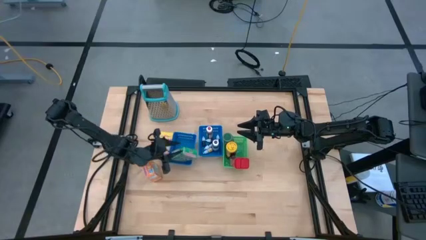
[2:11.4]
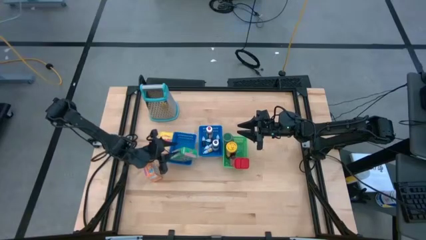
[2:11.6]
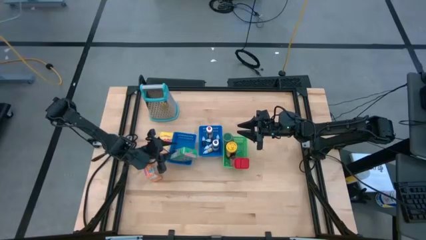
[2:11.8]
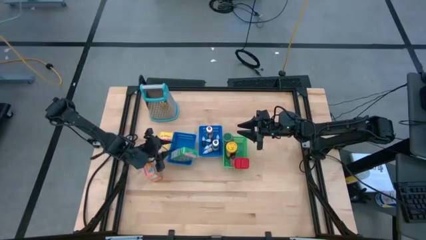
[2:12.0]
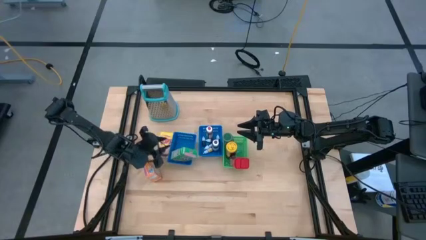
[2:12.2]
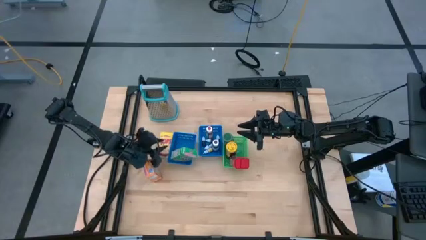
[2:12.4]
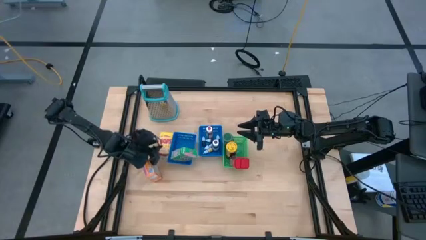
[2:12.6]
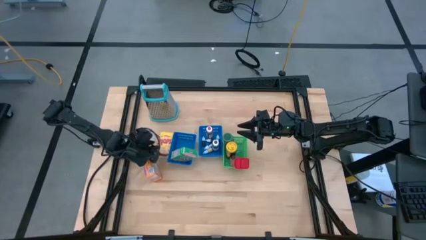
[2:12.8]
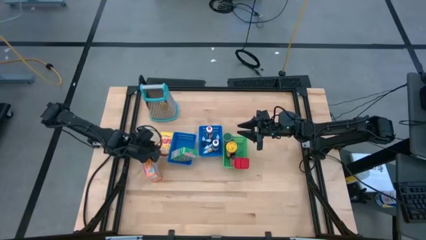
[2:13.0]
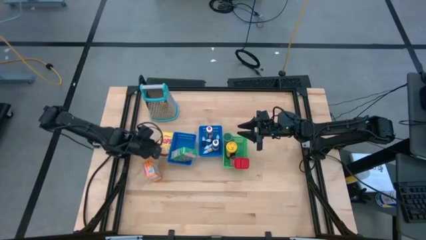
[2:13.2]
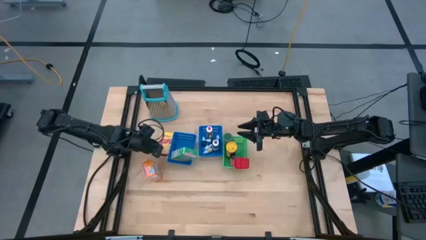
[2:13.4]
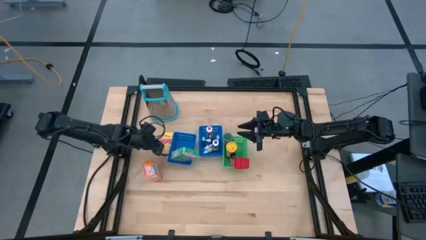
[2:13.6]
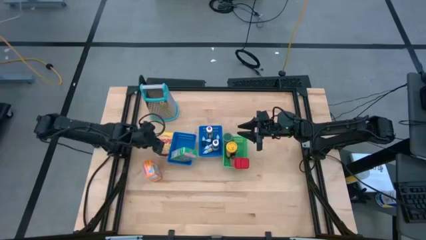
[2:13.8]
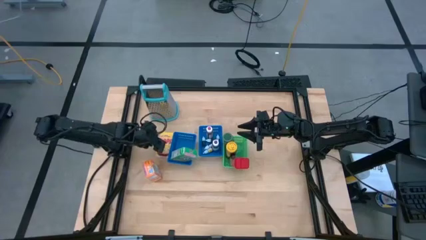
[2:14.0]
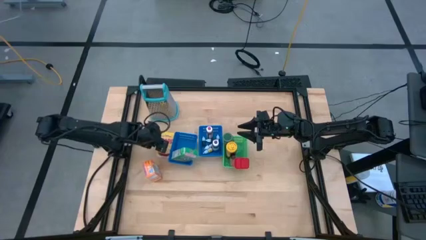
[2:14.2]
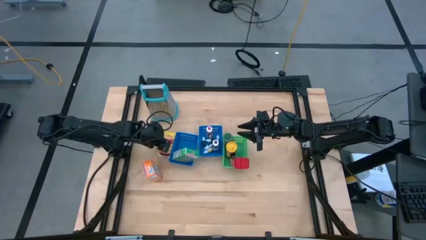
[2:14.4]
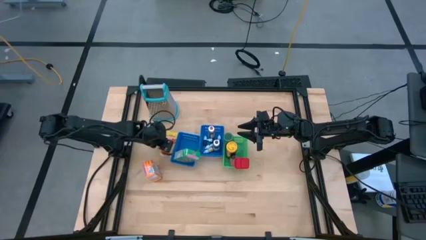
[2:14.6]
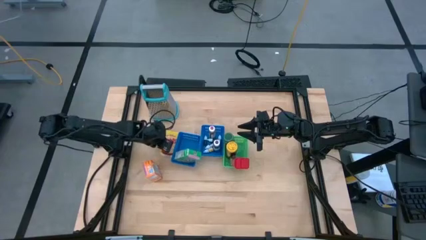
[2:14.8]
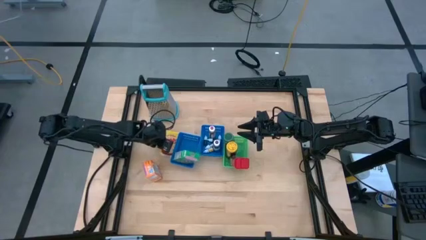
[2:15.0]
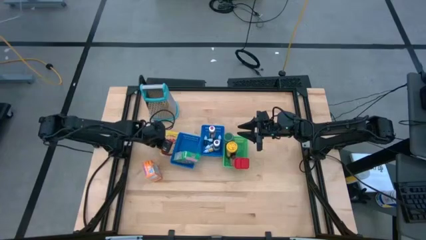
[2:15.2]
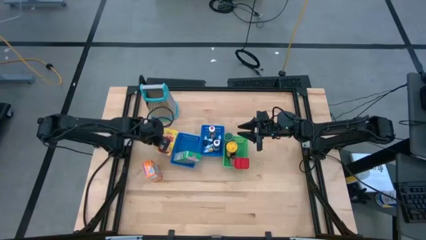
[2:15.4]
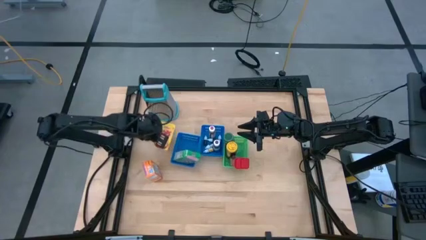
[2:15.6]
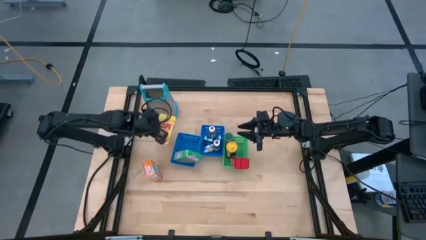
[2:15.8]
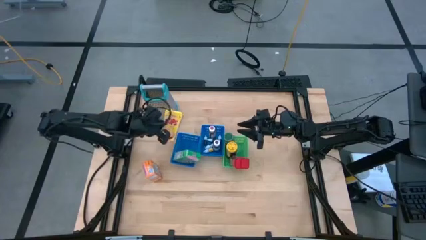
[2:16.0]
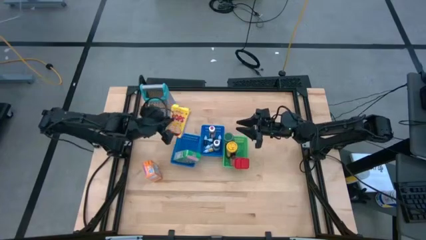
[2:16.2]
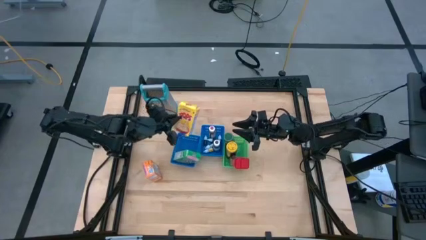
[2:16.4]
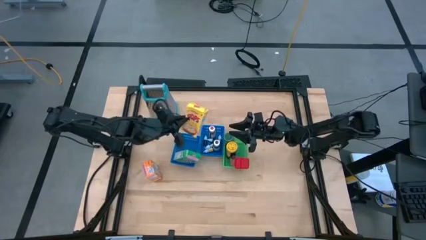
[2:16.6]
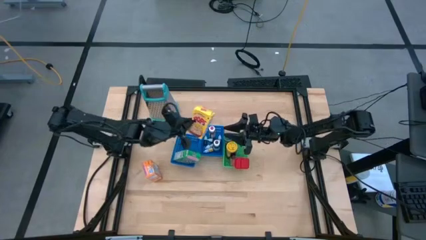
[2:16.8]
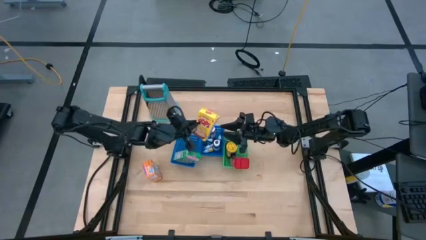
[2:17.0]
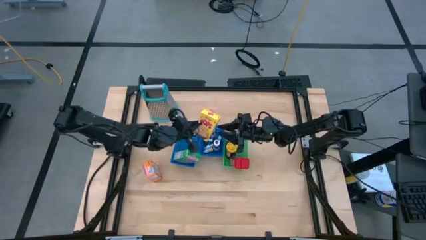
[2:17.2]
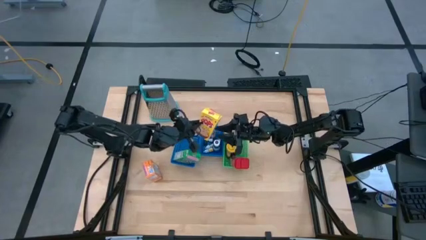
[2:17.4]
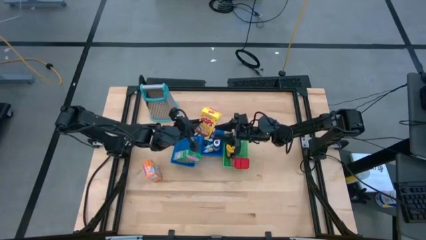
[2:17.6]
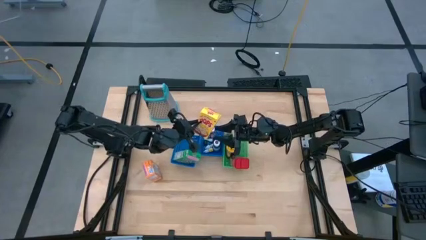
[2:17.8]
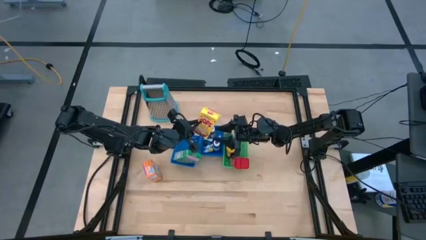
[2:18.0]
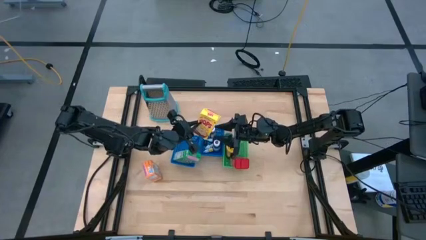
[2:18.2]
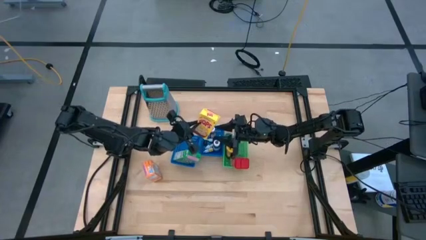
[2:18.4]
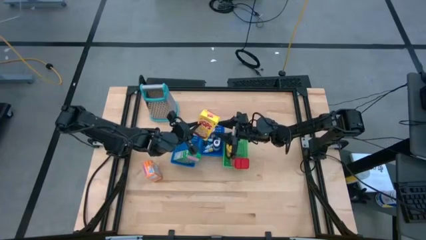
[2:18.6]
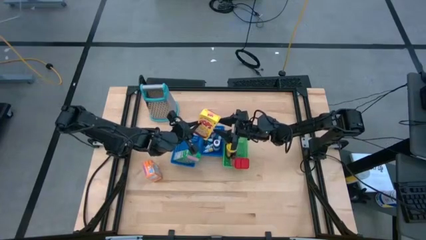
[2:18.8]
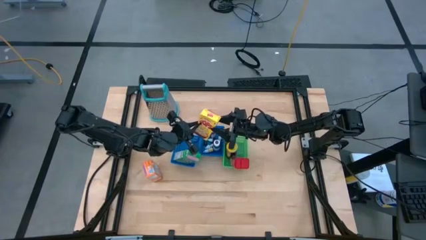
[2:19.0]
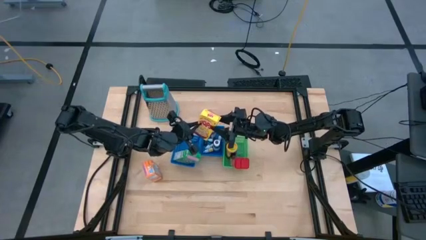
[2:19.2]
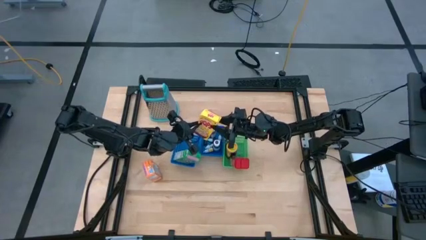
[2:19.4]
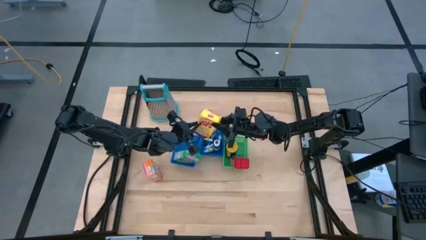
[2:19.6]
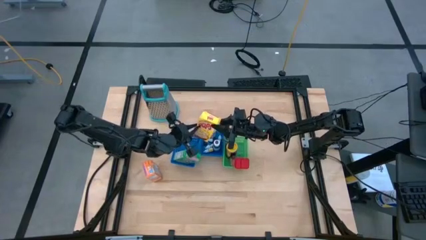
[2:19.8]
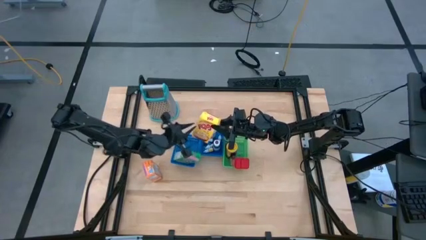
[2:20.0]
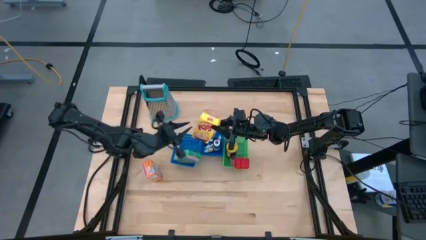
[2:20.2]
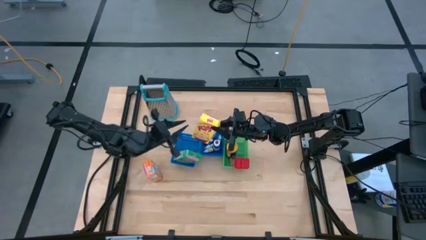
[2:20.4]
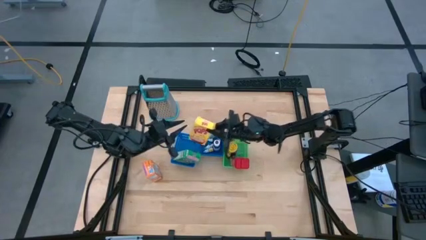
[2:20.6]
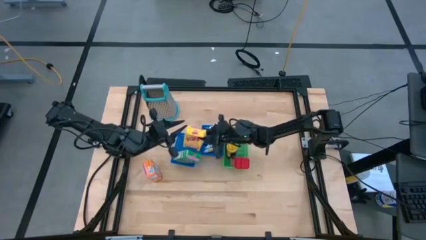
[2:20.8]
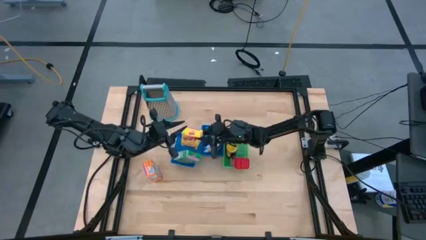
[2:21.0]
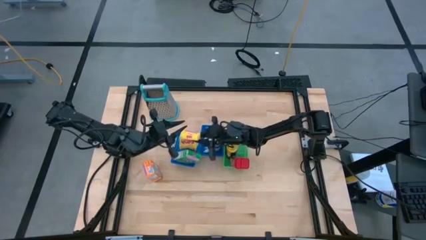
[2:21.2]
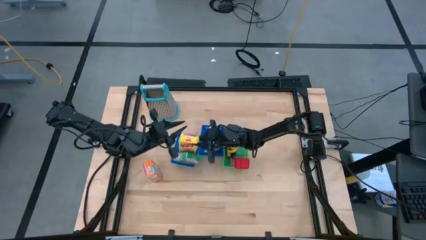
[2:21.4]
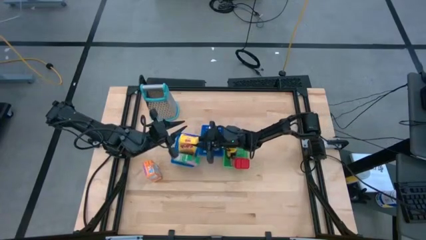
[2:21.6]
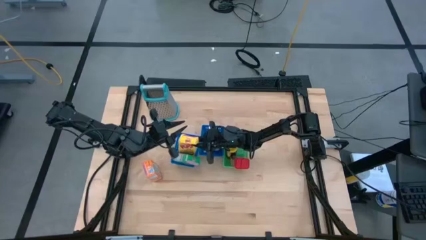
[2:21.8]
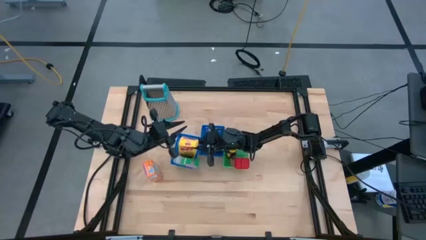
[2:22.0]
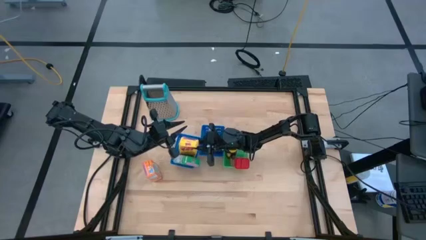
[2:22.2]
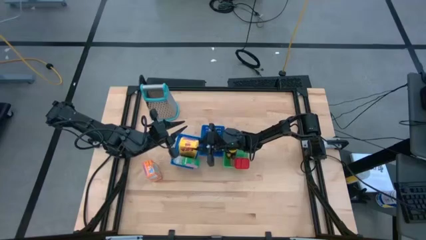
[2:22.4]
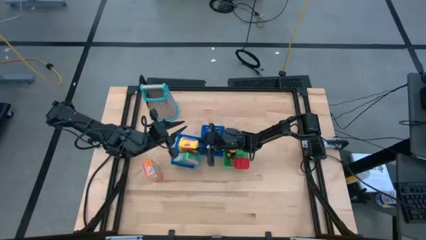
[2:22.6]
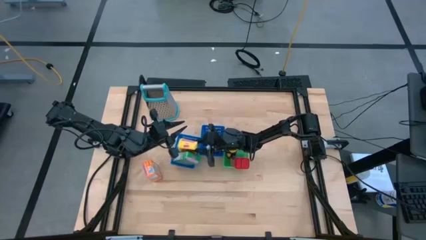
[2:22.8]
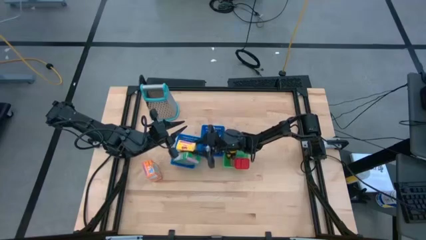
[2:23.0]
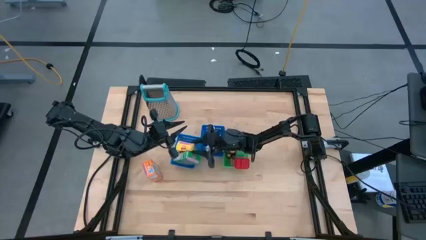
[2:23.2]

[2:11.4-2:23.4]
Task: Pick & Place Kitchen Items
Put the yellow cereal box into the left blue bin
